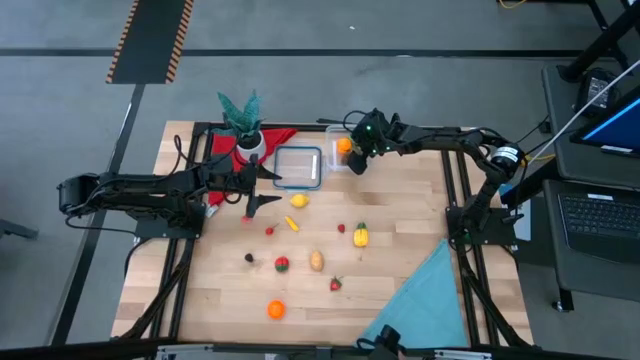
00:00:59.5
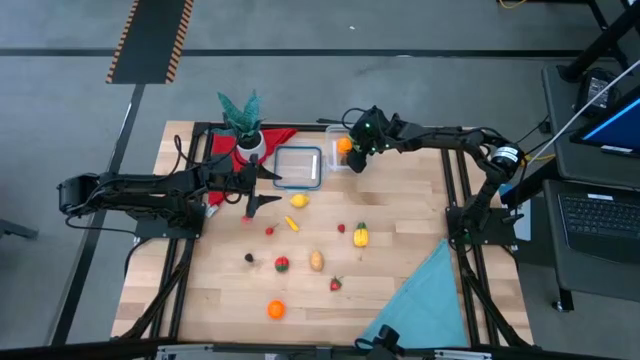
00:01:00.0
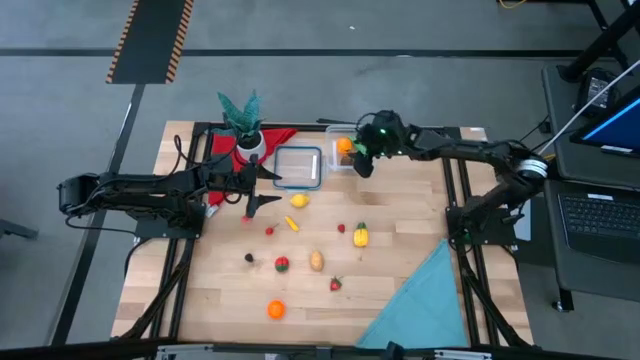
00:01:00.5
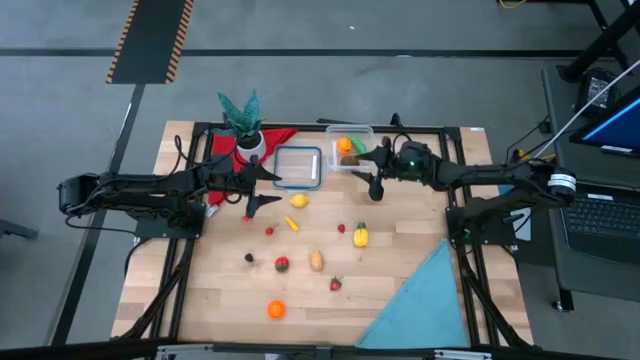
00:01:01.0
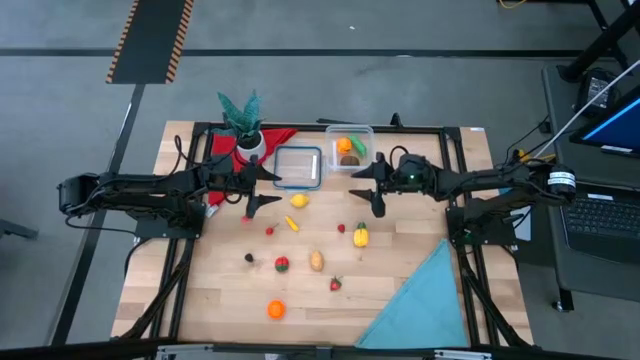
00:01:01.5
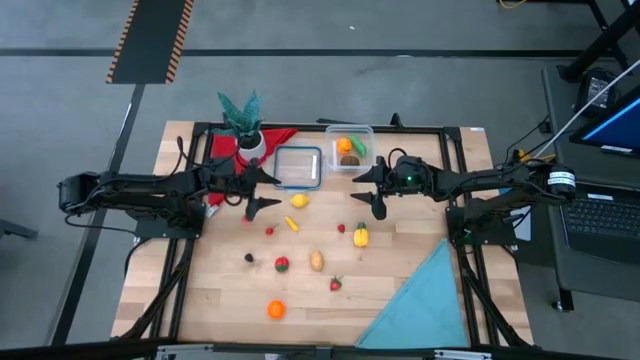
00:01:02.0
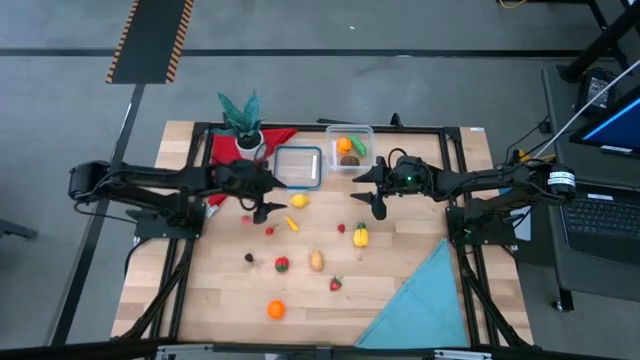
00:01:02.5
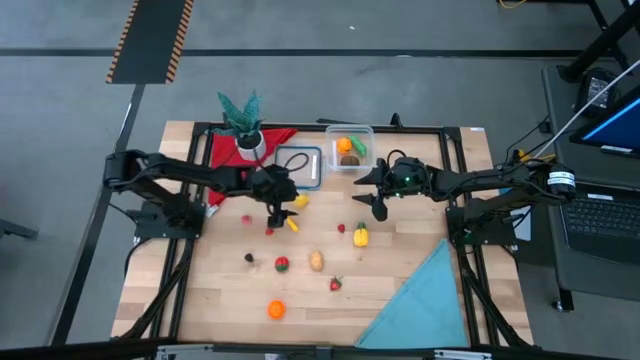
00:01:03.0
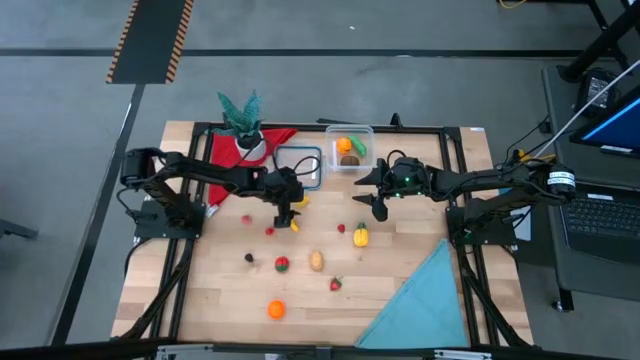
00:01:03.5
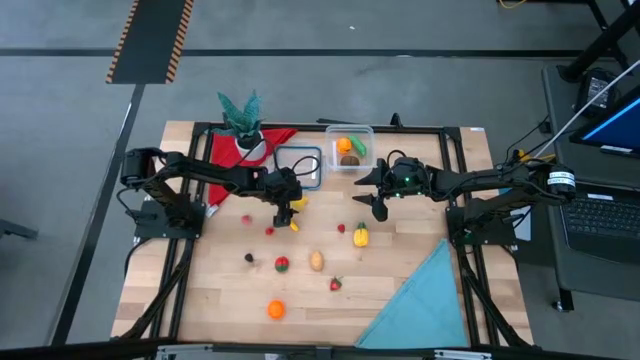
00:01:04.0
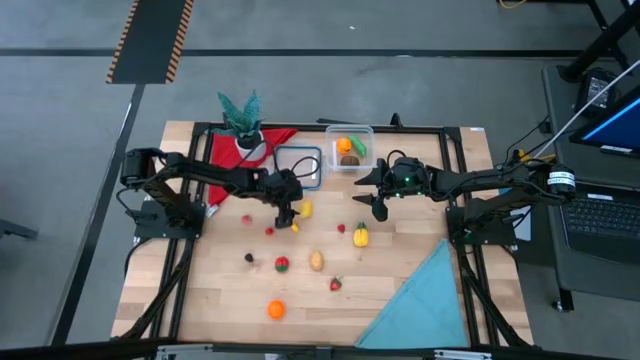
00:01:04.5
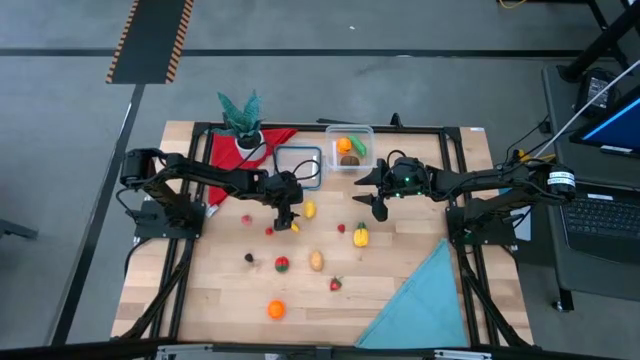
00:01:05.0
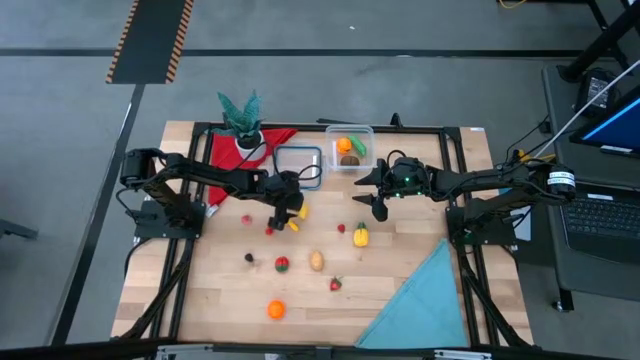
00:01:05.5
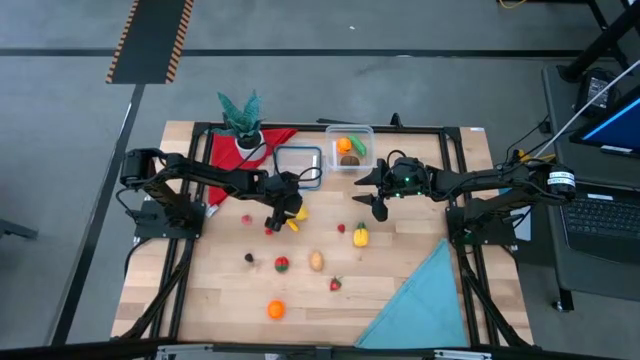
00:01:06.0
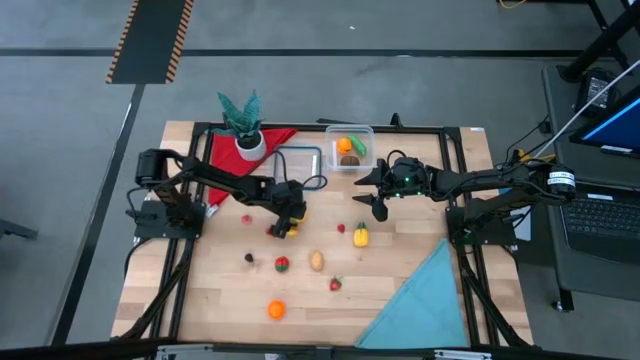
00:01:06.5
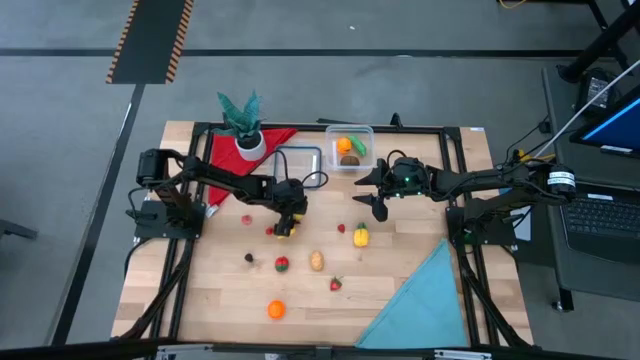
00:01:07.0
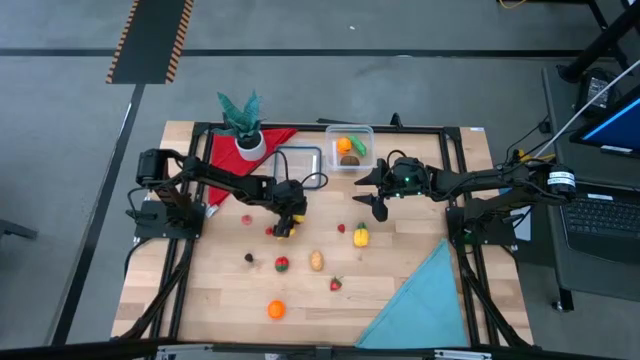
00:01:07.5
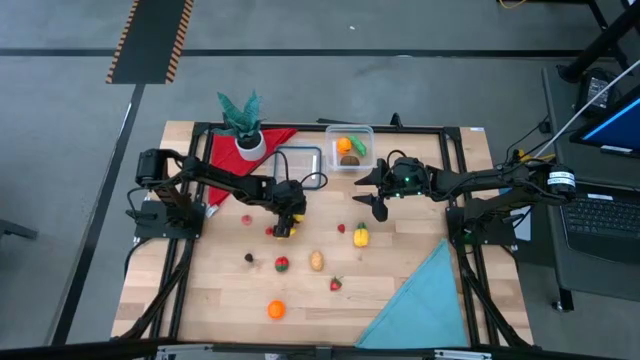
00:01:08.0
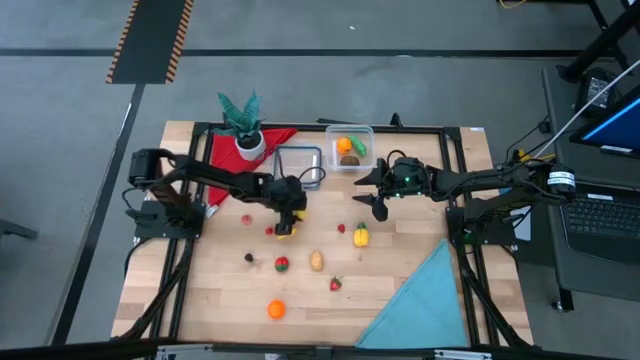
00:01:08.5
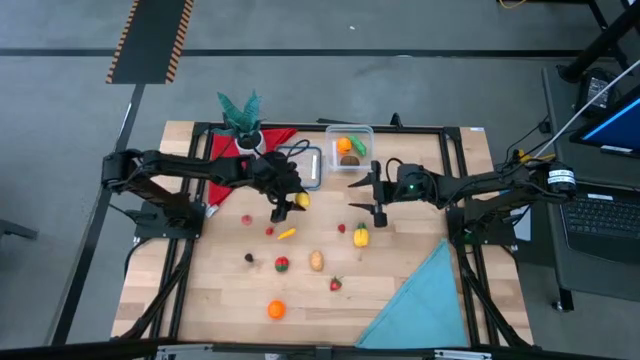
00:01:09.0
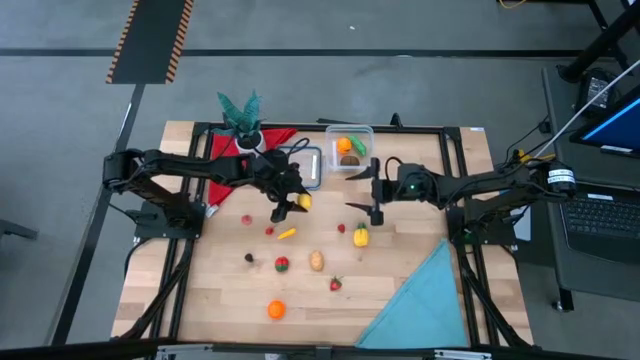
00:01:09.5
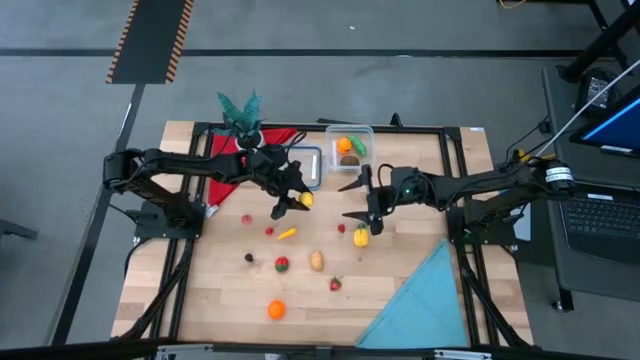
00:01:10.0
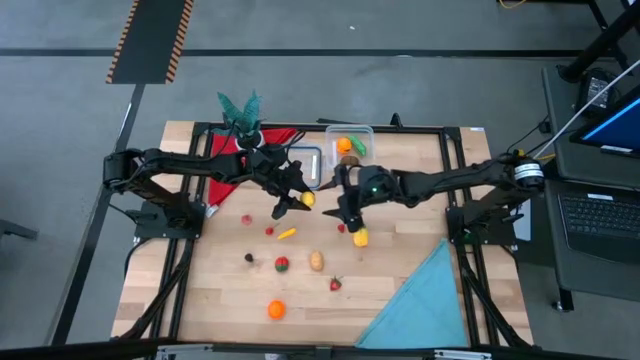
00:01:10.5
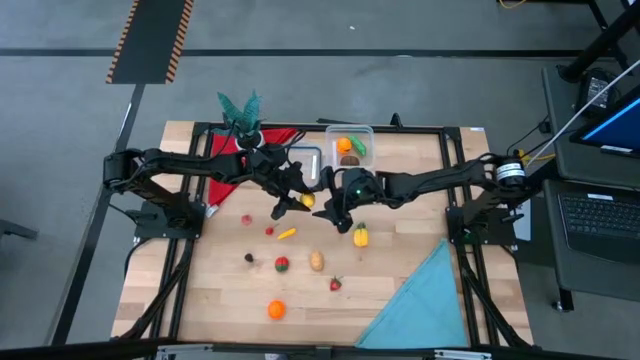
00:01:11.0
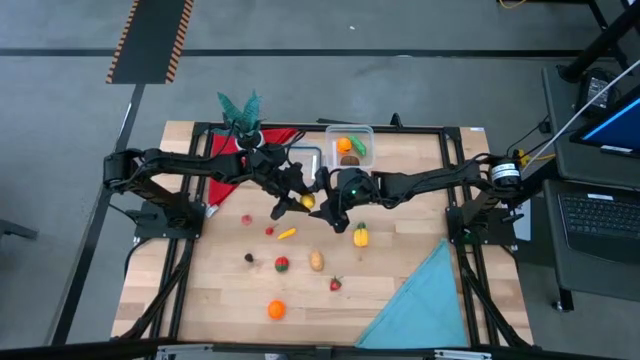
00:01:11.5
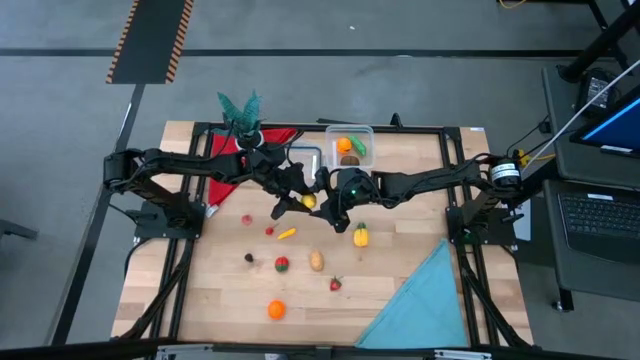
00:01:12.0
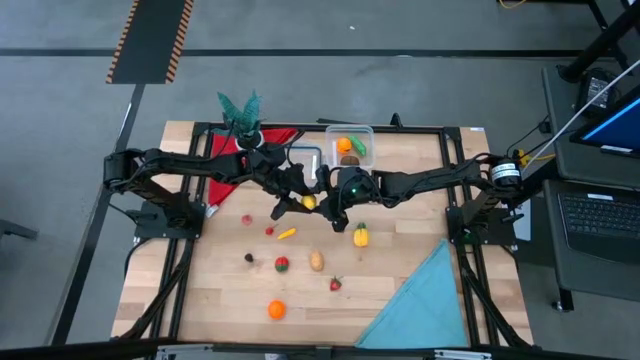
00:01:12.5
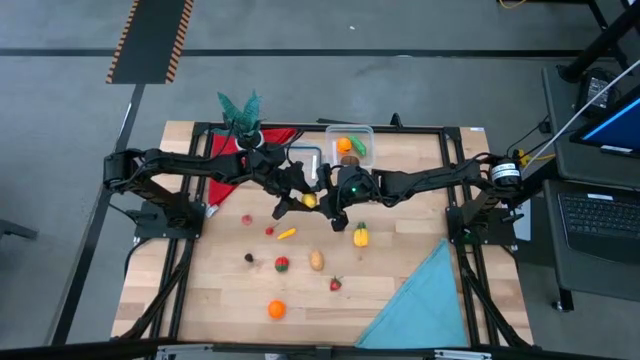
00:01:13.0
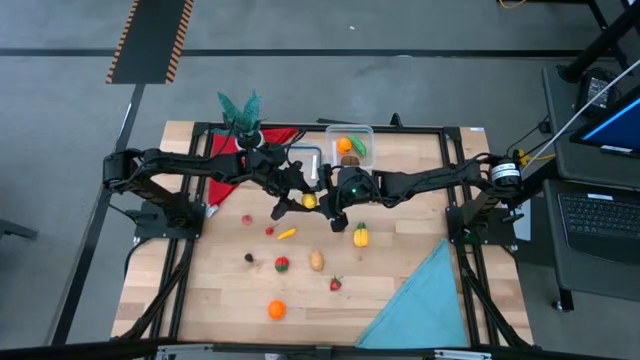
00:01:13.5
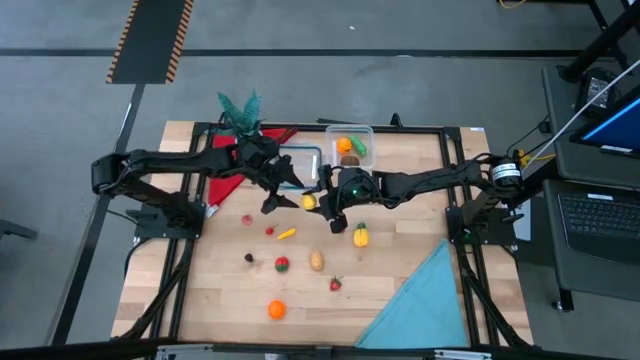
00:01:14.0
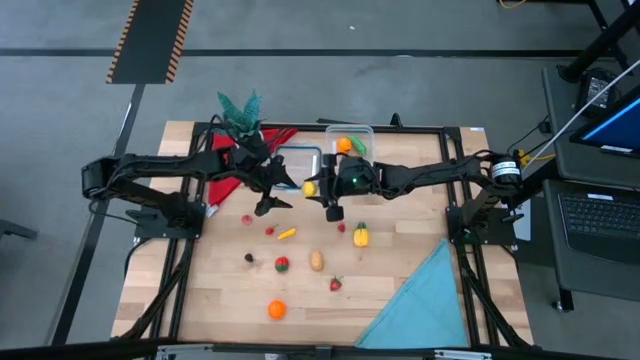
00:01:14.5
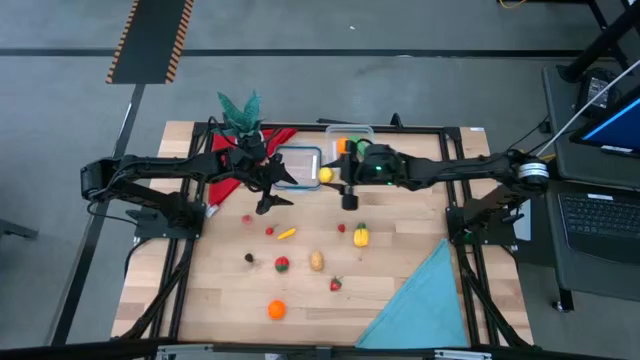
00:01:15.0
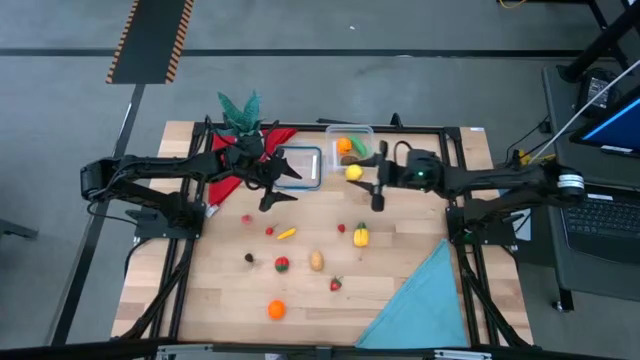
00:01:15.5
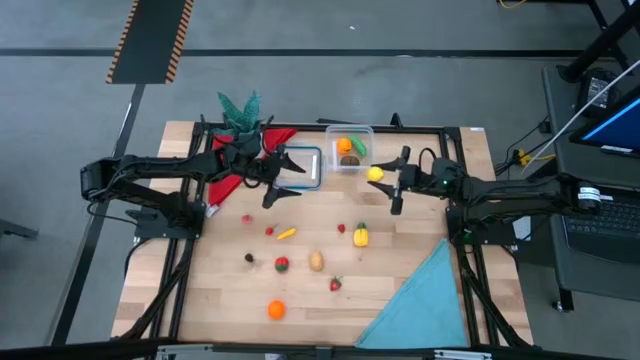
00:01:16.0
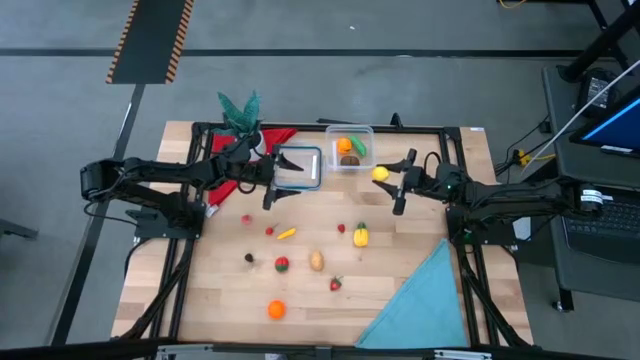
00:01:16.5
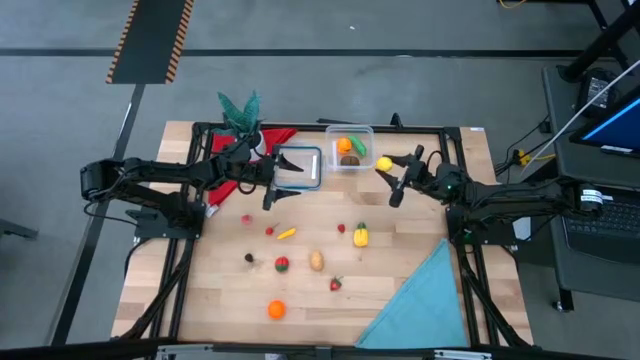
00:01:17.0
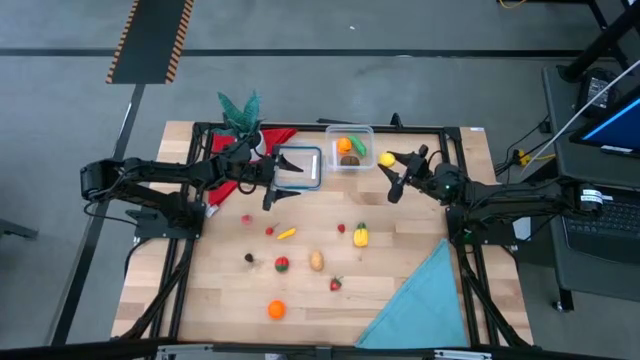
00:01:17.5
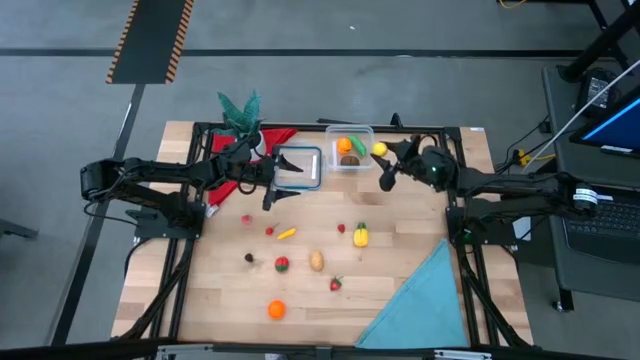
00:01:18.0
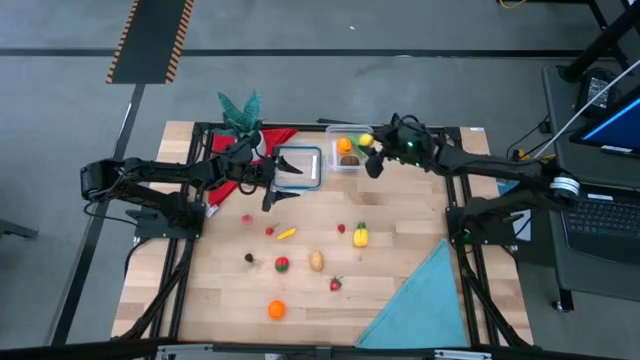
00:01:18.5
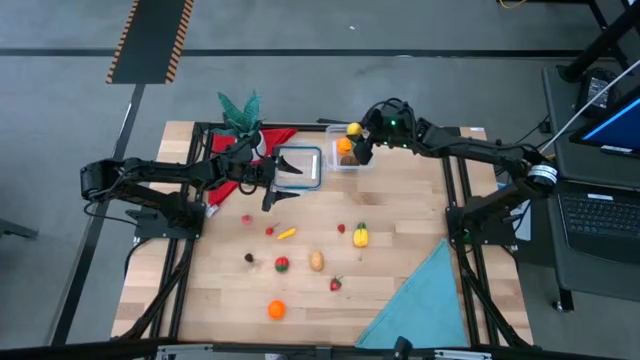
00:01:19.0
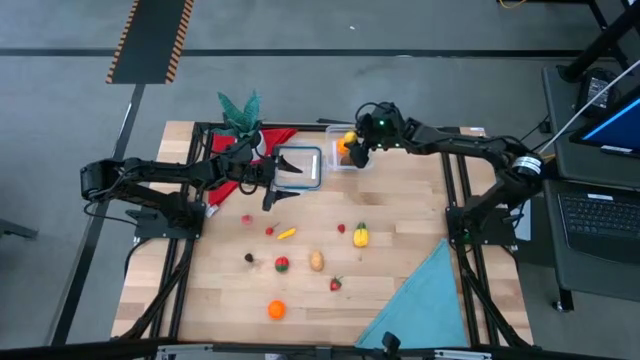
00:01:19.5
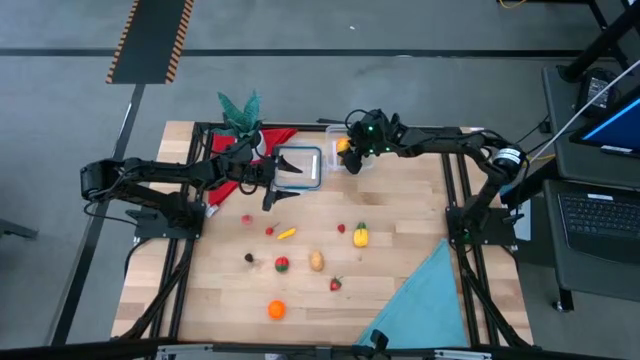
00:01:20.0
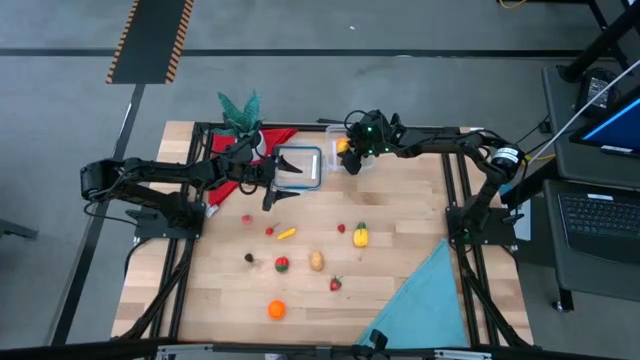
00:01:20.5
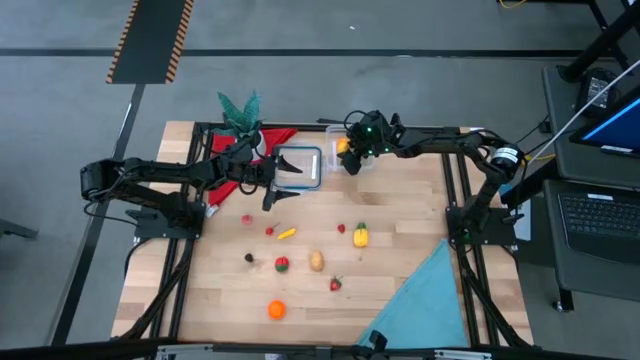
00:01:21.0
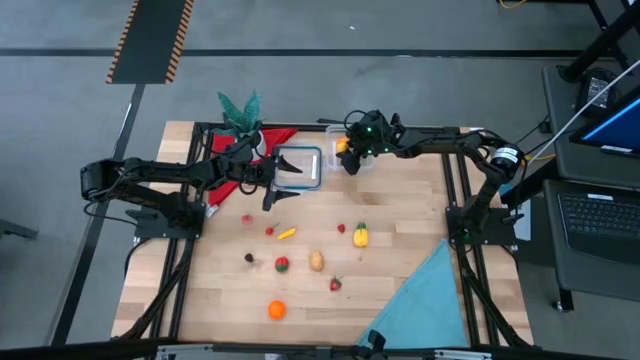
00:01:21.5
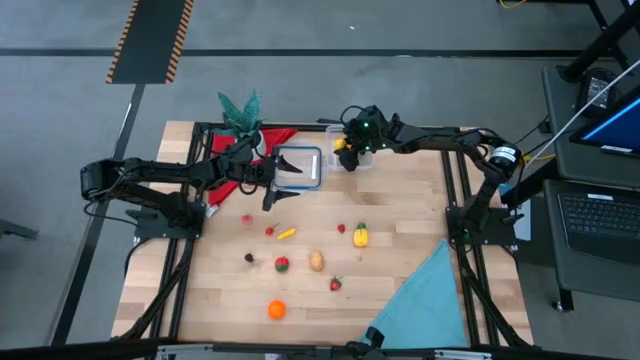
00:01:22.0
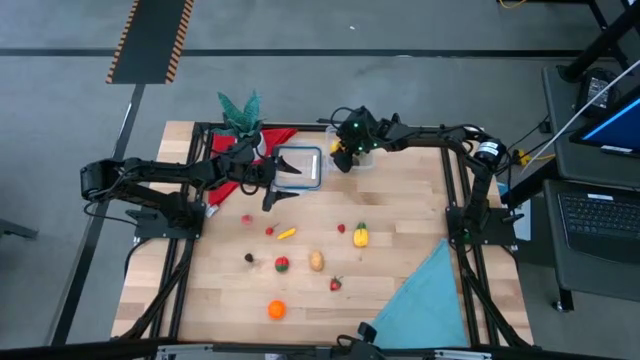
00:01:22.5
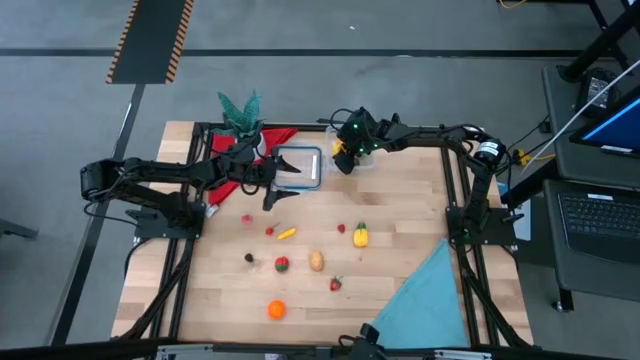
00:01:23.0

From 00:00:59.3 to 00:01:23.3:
Task: Pick and placing Produce into tupperware
Put the lemon into the transparent bin
